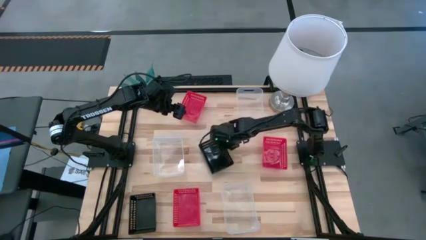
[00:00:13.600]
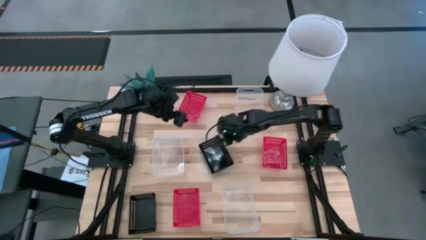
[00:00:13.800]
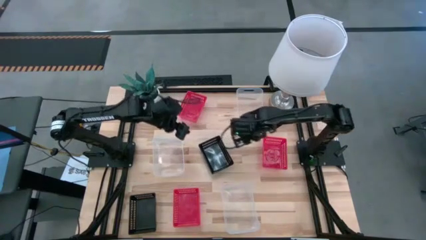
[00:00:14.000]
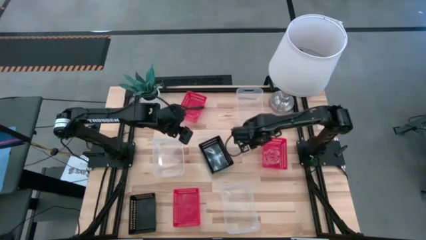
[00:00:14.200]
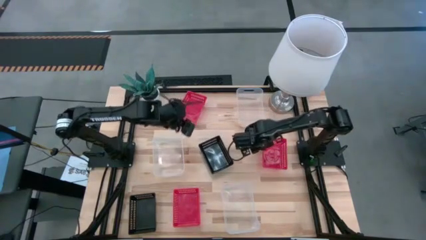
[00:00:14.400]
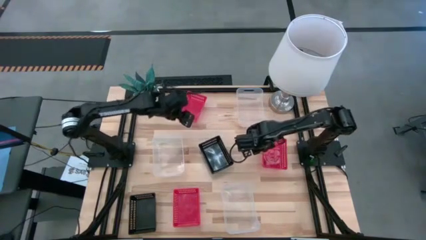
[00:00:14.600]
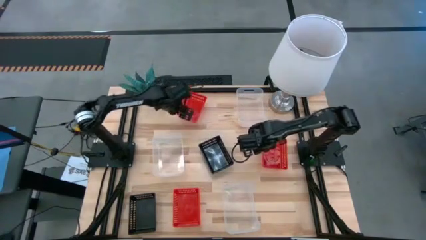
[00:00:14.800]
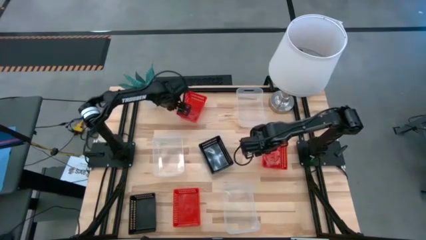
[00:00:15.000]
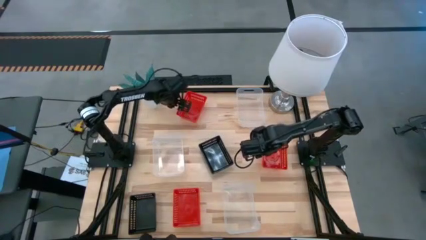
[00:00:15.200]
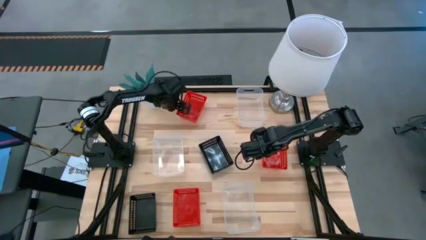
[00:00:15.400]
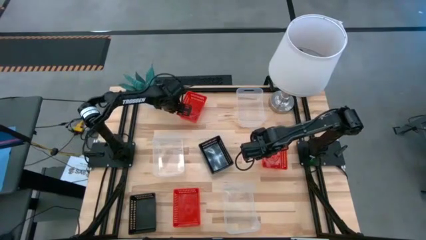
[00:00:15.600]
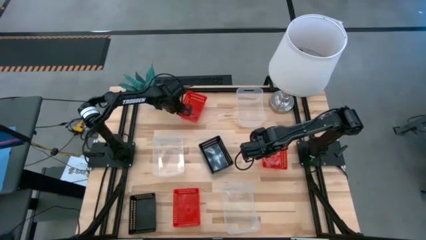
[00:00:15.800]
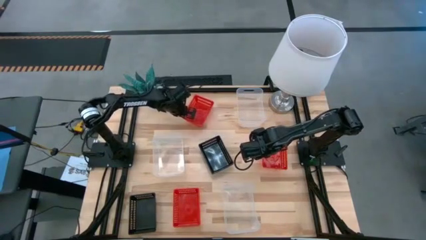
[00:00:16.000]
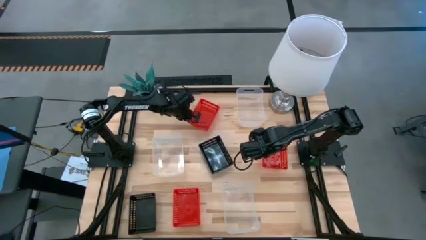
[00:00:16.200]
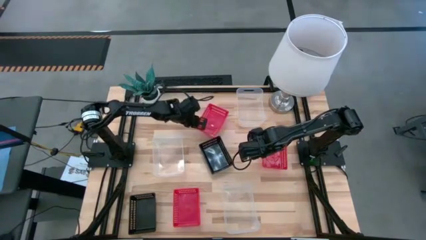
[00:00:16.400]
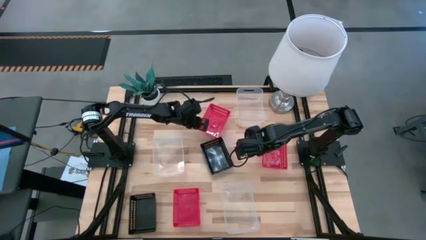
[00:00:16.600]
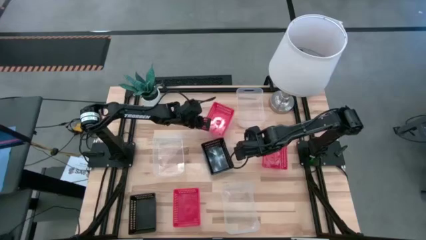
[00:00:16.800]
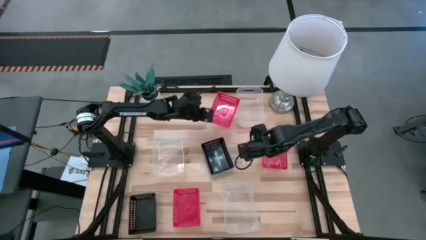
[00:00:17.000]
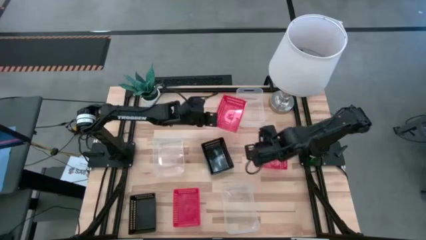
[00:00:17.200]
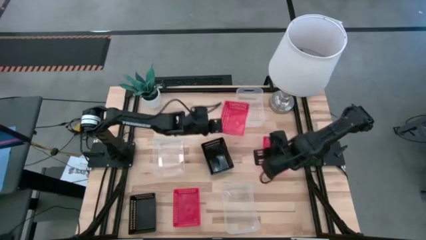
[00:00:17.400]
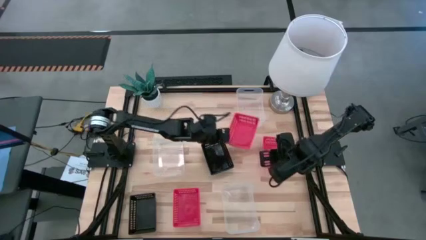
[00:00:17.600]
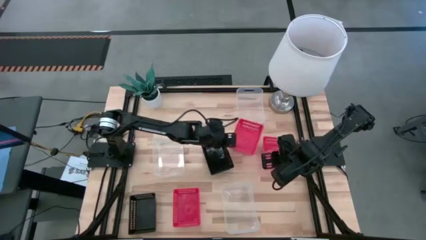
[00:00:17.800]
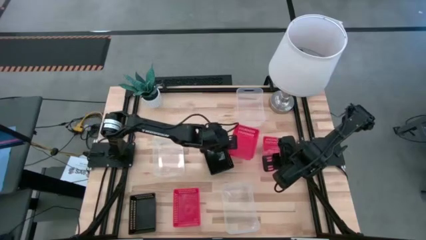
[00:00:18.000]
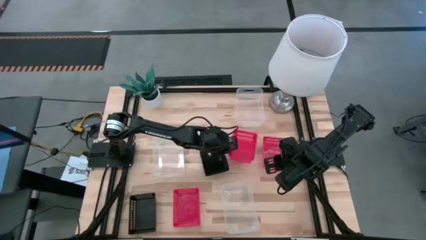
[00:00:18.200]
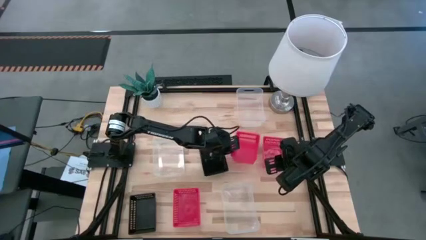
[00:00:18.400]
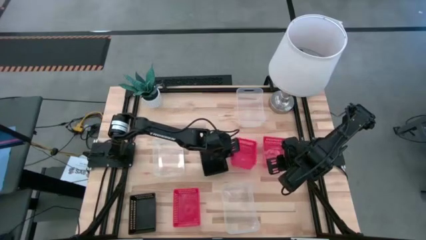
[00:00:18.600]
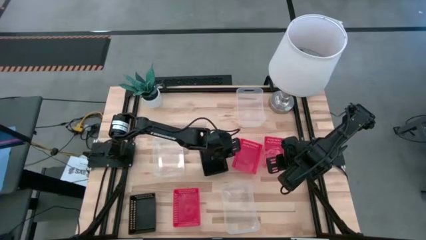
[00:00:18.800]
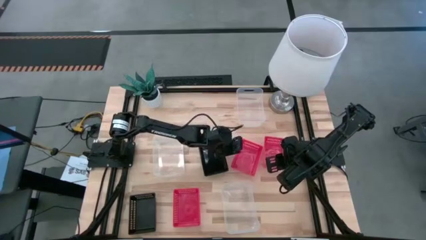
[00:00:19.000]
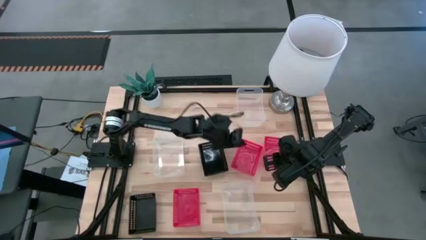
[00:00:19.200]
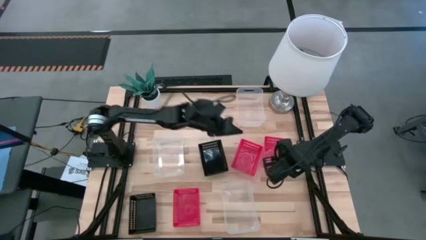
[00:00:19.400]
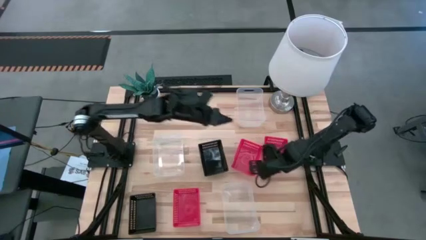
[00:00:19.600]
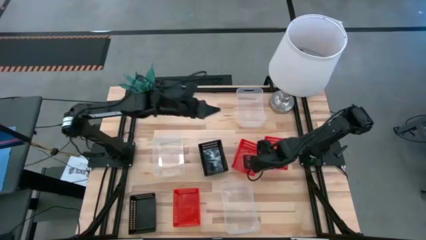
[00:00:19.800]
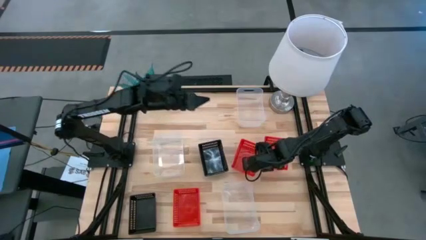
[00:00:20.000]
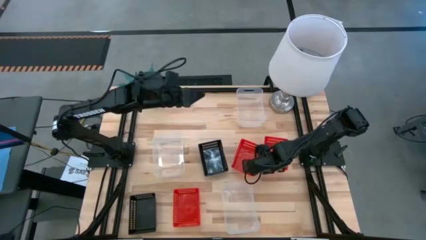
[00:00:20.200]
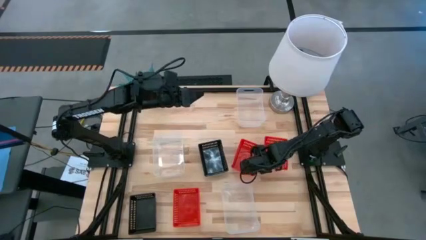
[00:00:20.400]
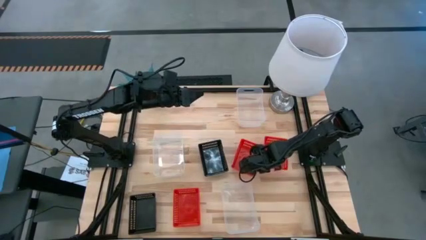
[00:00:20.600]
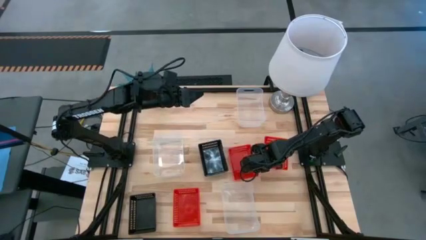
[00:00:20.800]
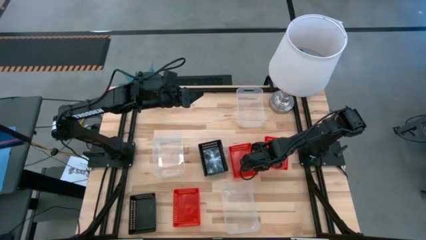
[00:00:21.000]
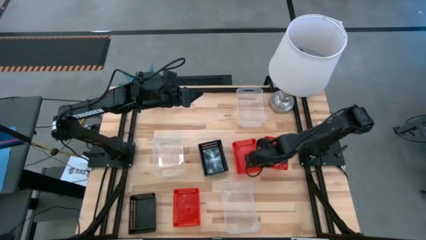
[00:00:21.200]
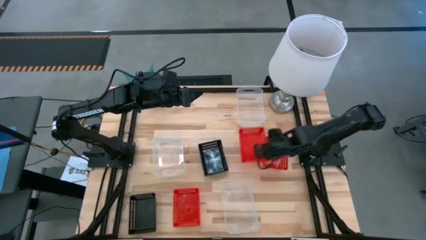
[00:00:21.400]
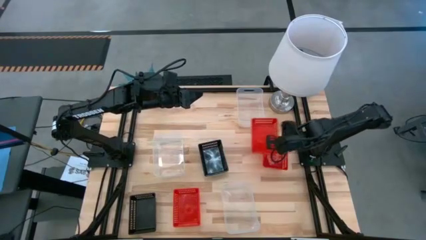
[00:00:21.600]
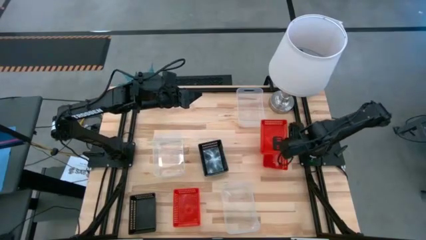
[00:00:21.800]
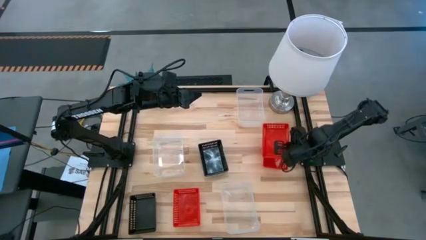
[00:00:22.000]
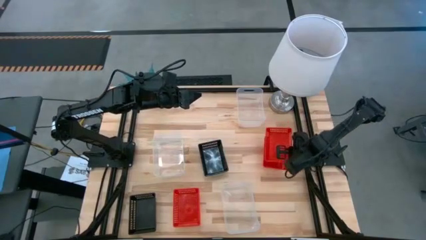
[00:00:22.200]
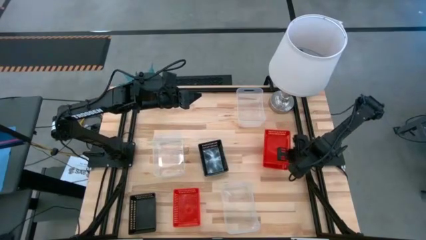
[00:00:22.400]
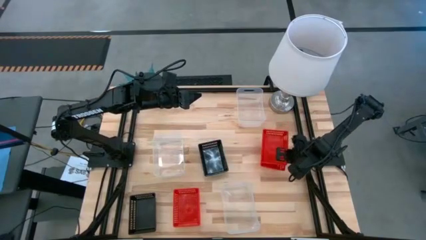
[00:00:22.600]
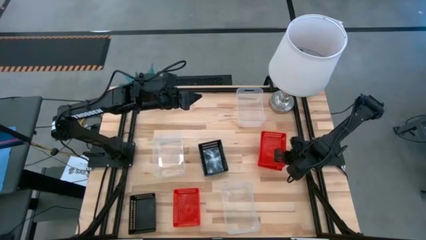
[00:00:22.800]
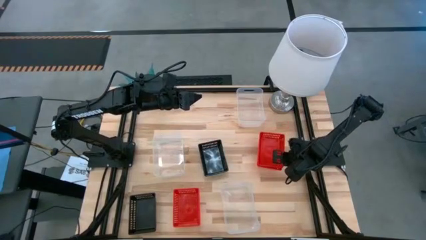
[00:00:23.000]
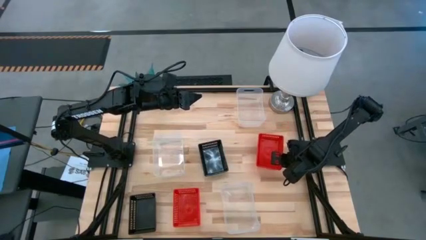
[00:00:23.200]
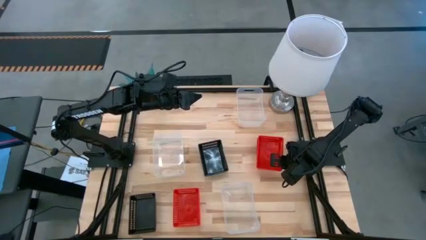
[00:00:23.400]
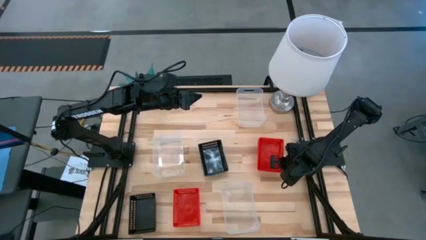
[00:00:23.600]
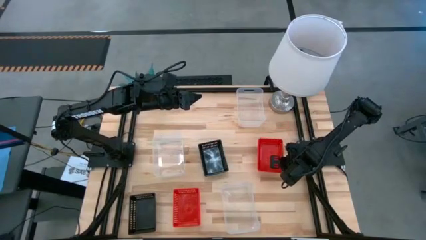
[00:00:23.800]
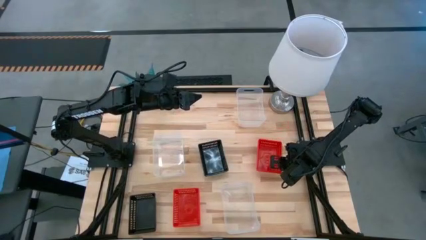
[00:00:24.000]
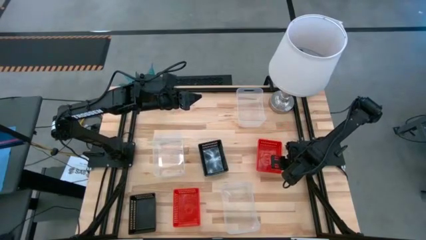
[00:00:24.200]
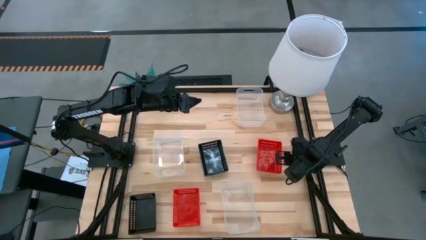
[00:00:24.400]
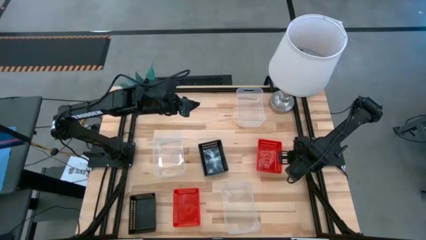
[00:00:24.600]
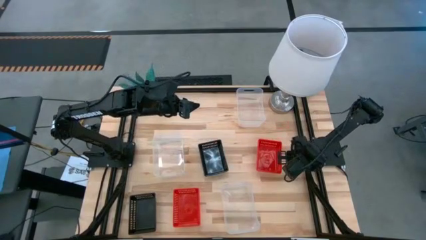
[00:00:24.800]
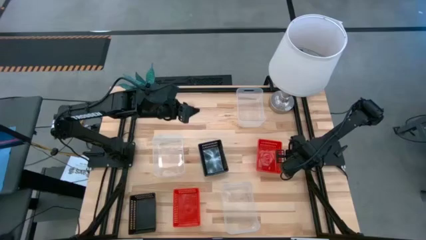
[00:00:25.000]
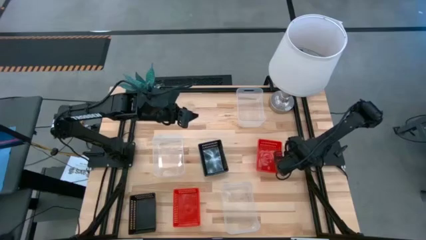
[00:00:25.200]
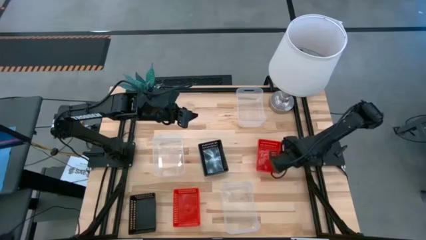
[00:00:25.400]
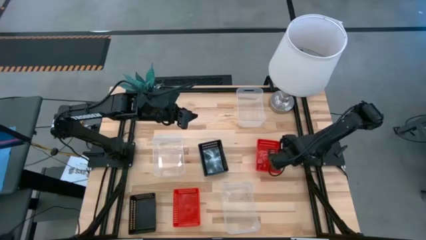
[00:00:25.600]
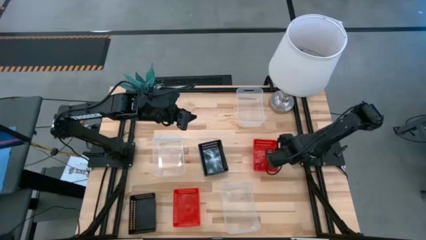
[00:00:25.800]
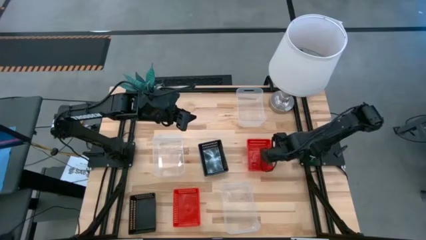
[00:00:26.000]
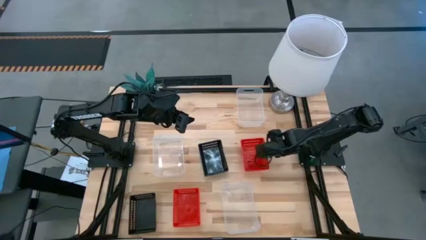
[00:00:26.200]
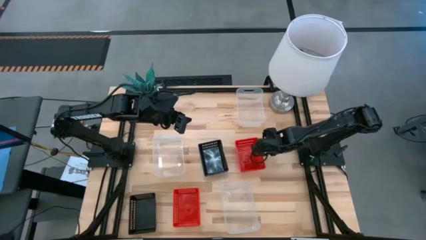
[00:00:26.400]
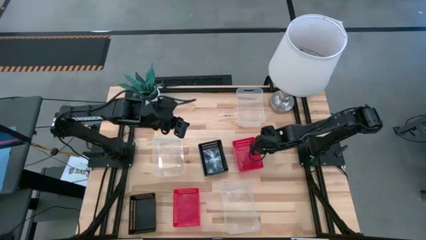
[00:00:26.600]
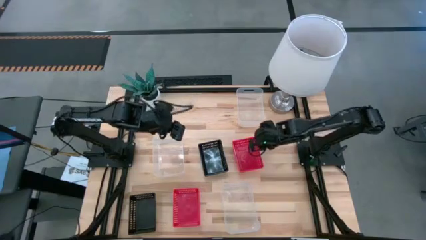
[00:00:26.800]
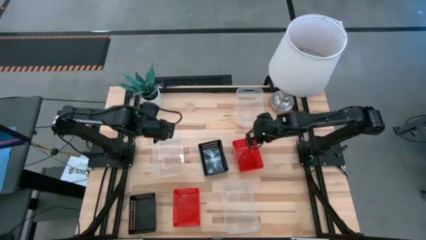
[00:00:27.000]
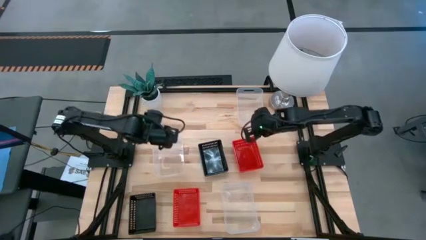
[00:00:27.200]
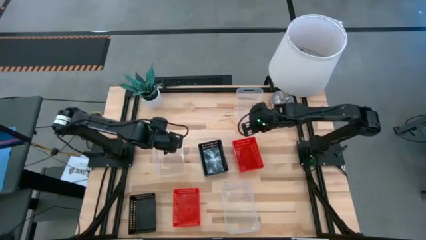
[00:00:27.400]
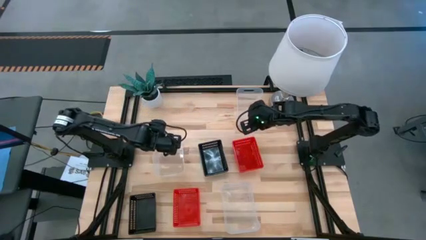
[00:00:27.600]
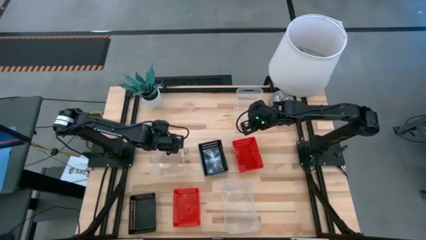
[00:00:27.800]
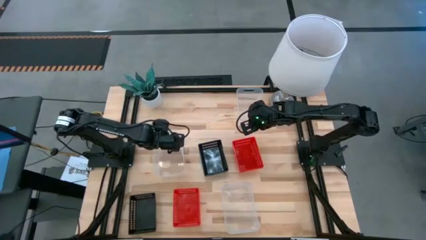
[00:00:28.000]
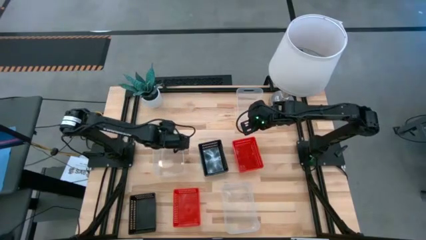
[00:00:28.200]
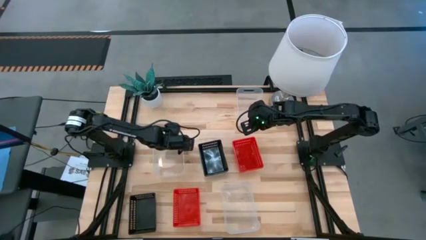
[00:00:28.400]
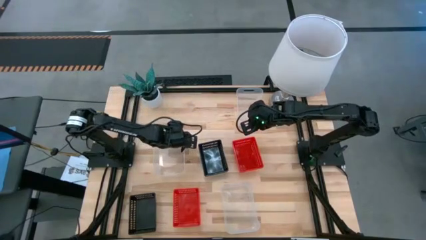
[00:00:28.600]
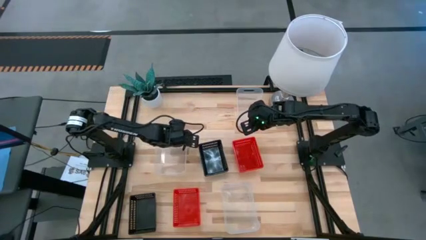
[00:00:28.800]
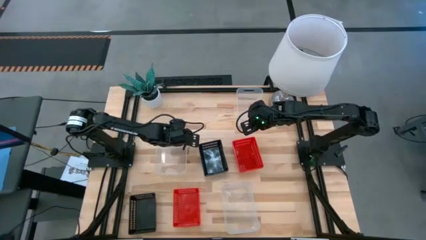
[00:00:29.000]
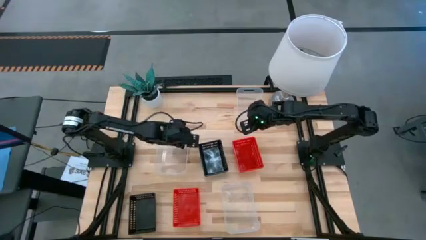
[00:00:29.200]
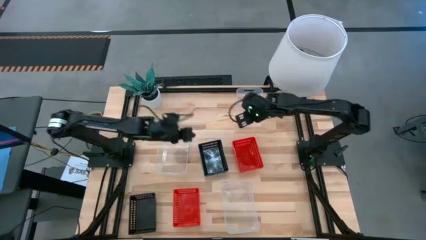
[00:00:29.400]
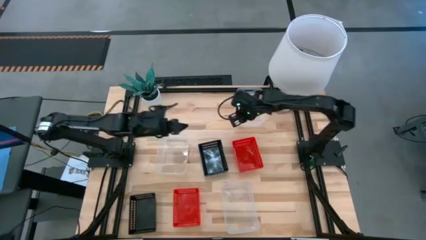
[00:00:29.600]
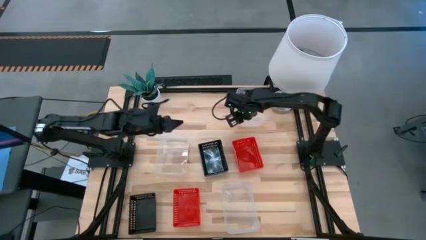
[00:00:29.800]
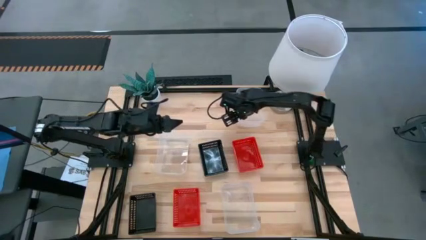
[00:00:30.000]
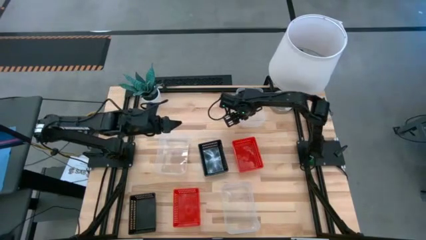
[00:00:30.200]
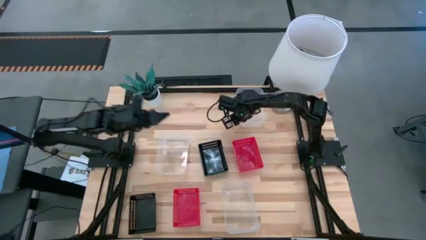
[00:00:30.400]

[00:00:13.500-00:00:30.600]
Stack the top left red bin on the right red bin
